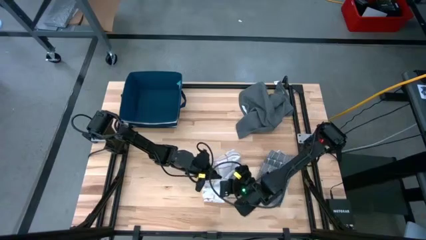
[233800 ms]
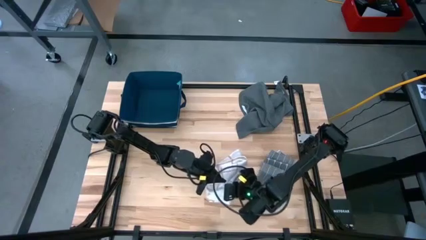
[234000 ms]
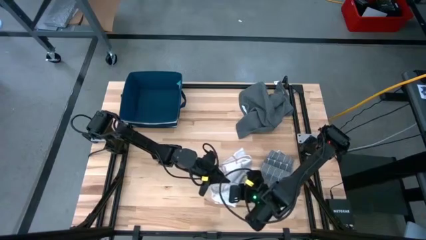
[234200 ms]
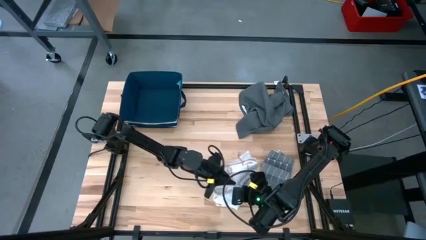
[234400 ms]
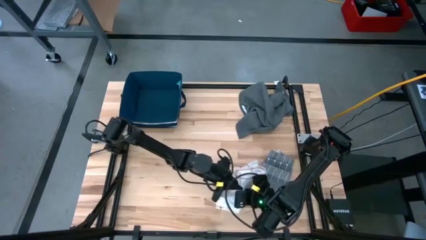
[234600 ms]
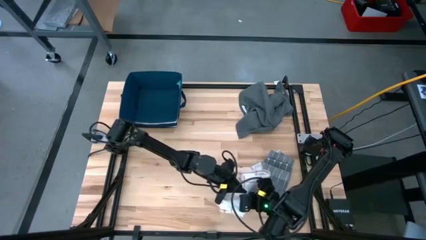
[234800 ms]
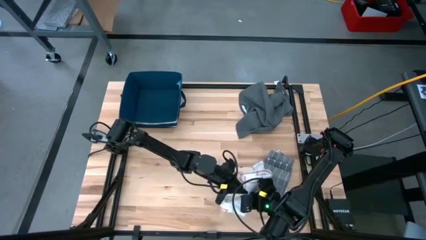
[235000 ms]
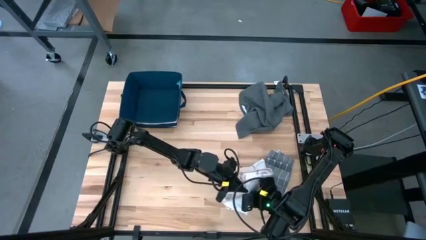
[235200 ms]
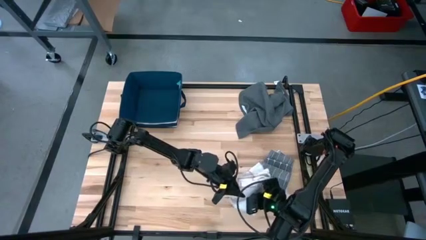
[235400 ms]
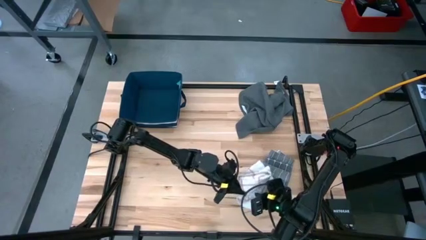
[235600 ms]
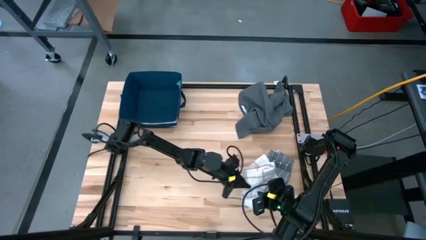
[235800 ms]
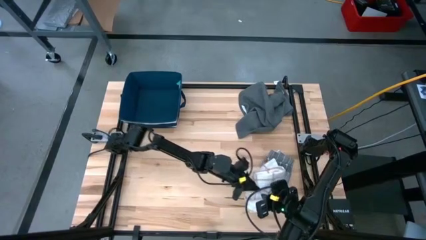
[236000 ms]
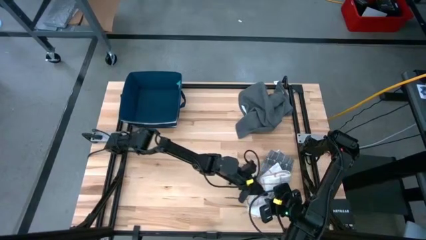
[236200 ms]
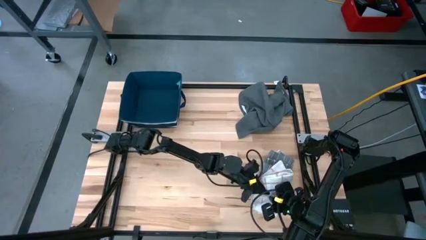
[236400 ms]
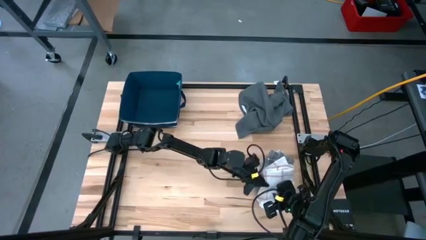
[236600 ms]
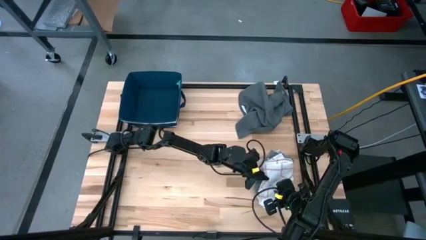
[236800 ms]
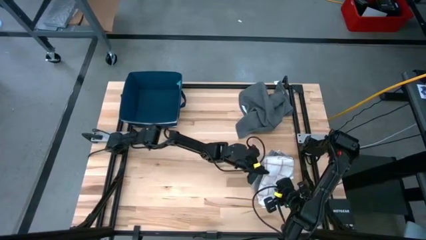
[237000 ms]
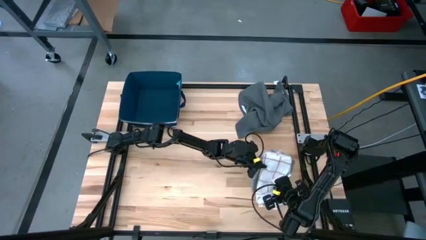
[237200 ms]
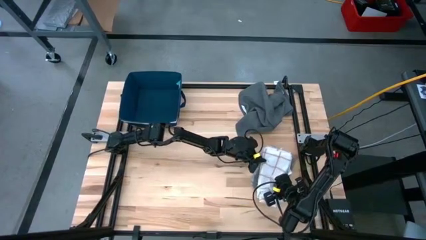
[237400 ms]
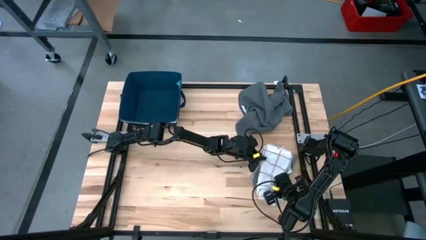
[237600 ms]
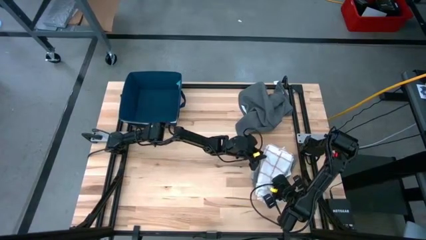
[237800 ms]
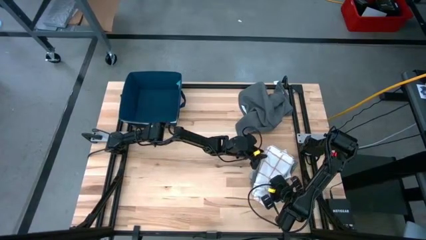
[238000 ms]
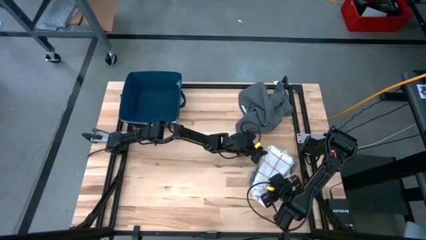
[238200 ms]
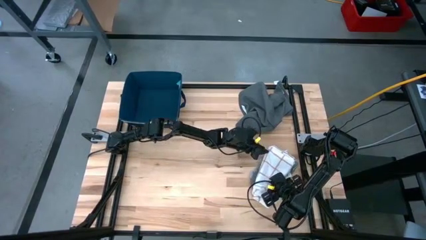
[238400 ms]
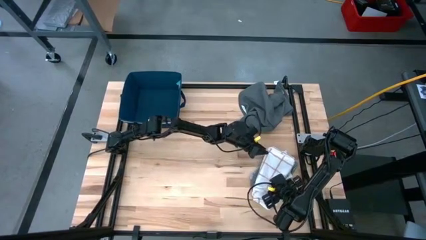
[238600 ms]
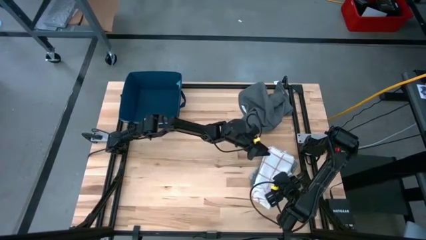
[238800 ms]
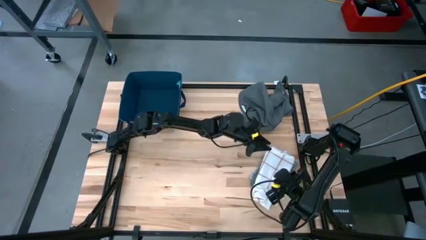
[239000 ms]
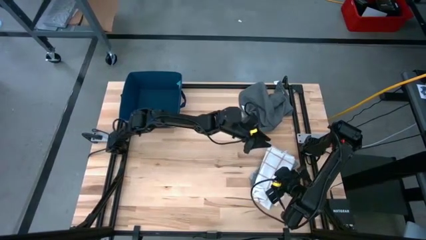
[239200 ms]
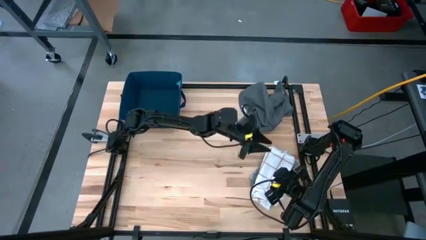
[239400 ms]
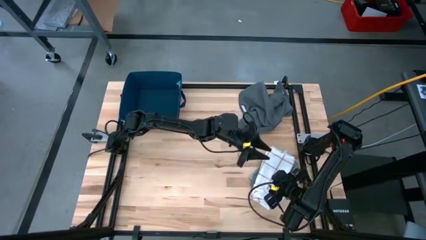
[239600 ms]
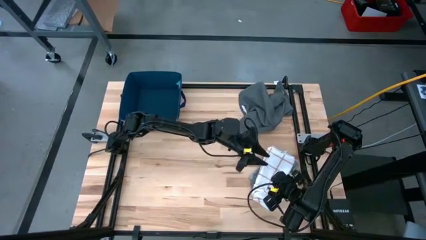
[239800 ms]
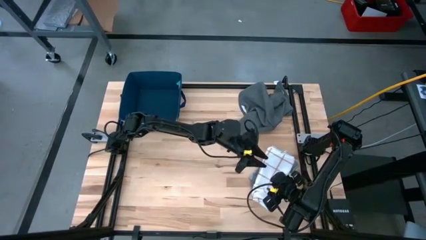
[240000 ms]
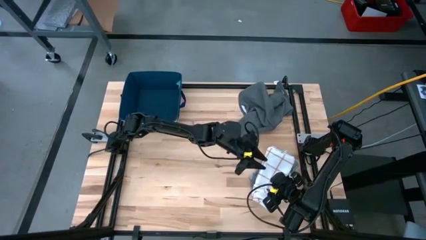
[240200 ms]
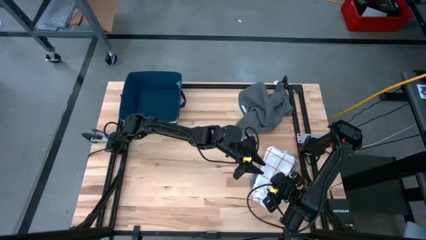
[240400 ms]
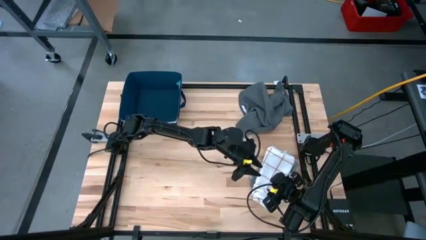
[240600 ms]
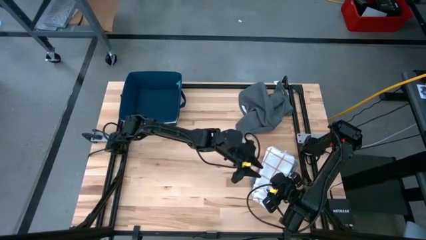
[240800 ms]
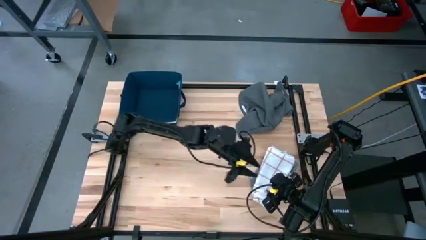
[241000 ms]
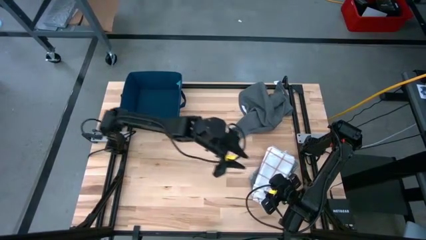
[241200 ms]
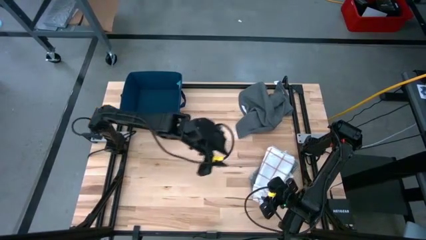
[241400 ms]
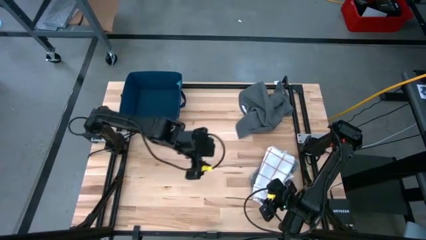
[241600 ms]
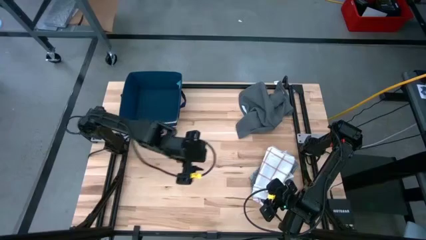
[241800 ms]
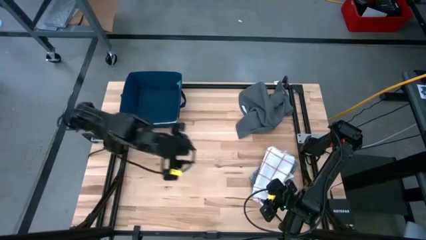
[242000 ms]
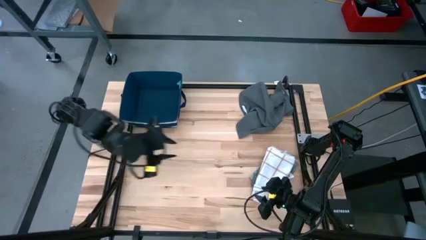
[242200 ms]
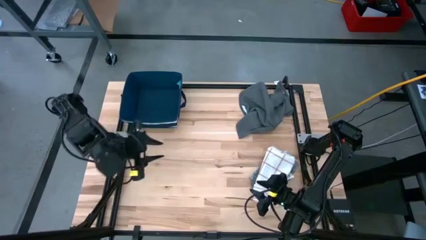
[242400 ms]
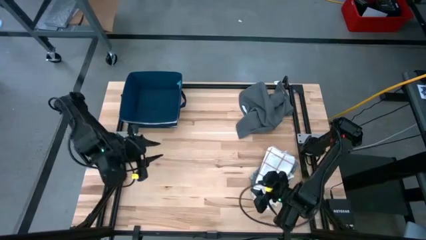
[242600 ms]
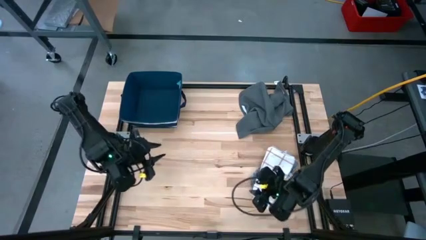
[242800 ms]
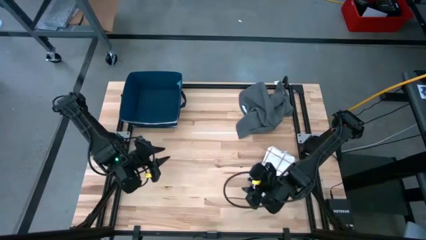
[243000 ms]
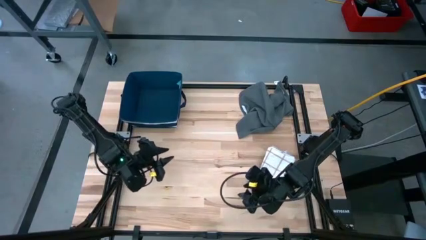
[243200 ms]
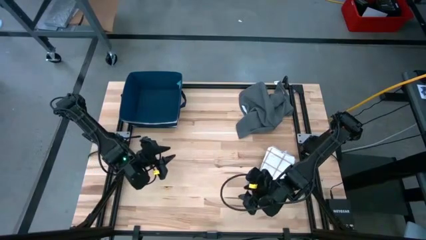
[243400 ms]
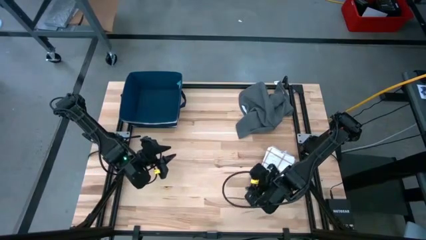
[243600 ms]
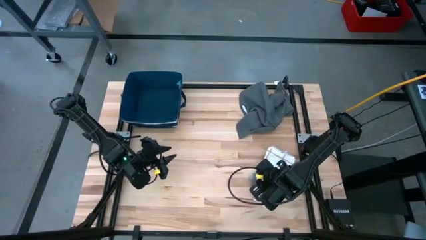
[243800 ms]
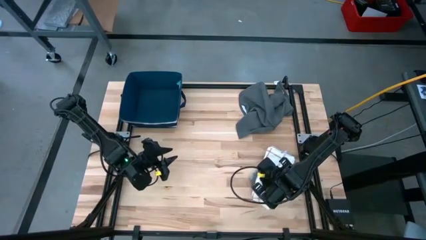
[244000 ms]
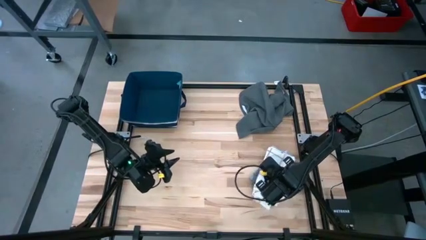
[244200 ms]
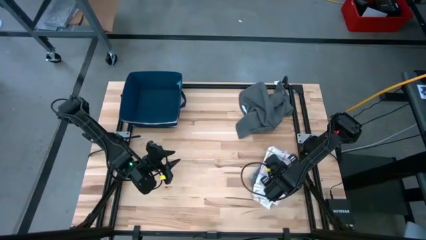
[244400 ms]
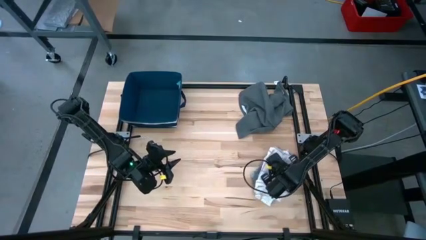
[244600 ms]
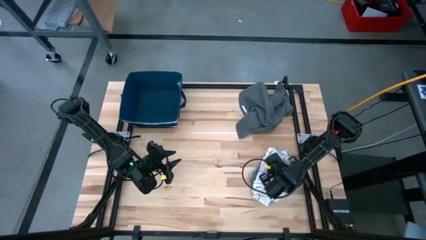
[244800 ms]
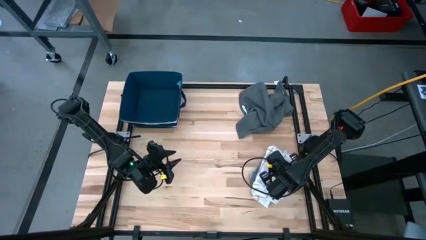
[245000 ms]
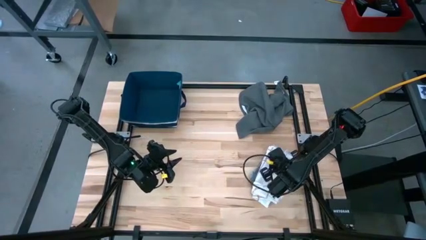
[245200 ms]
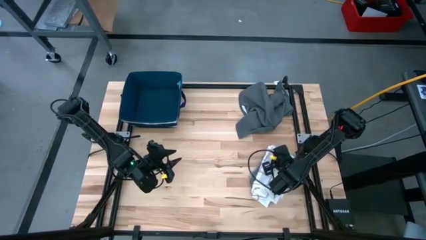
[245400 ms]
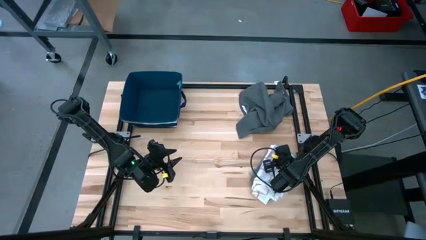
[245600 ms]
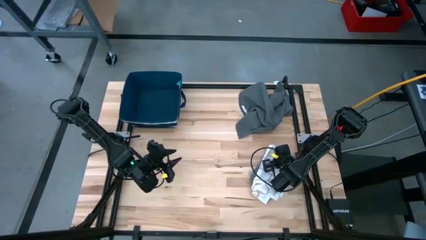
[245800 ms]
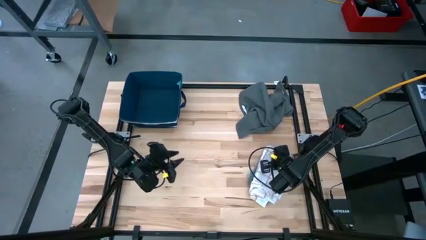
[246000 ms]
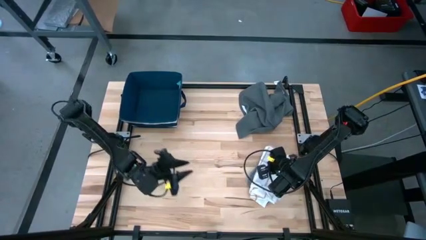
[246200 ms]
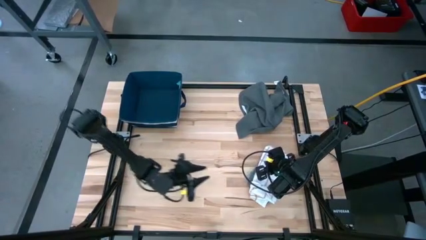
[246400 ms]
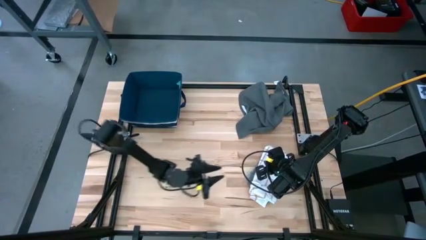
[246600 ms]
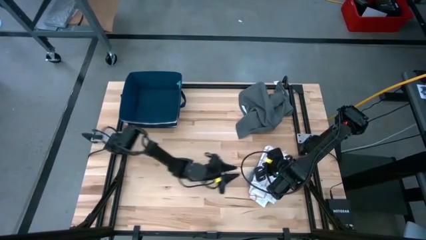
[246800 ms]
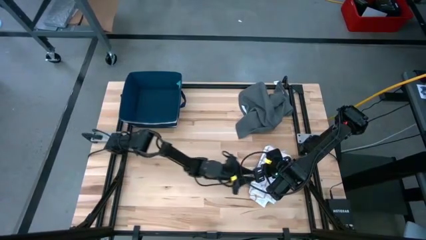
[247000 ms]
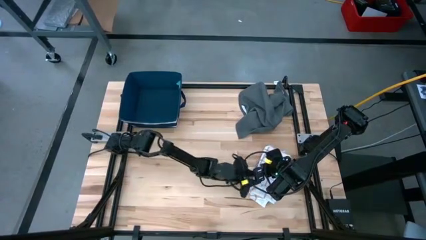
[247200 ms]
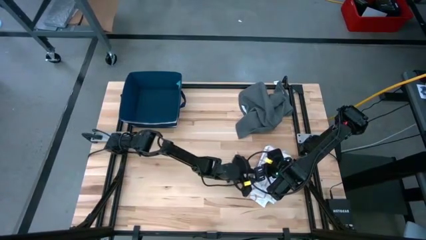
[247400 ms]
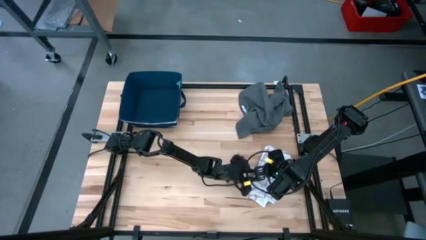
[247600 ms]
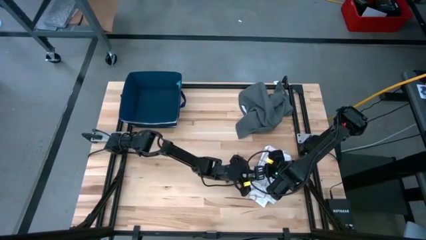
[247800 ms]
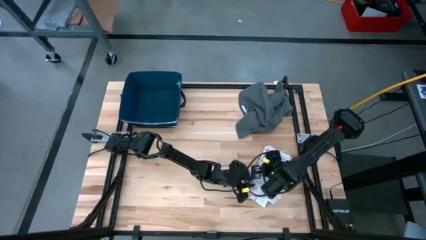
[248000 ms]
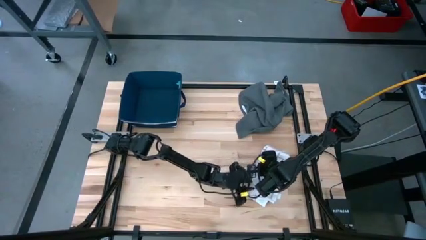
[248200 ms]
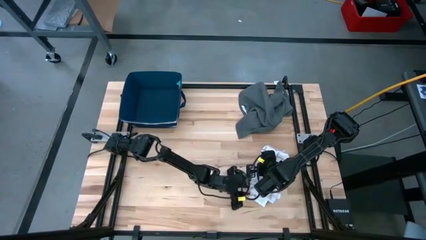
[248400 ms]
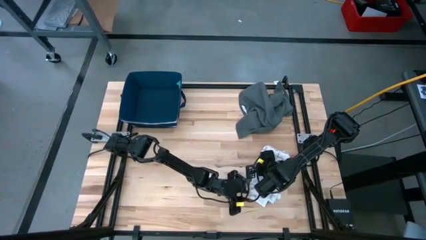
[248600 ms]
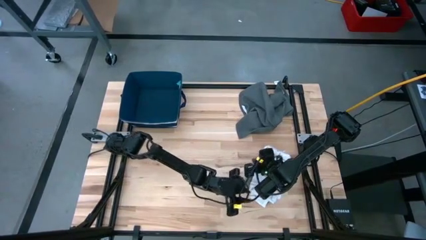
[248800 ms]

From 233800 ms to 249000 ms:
Task: Fold towel
Stack the white towel on top of the gray patterned towel
